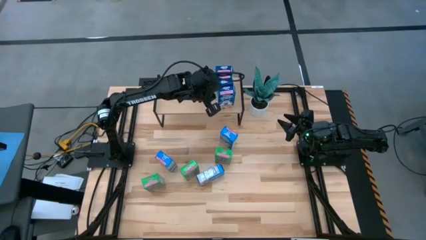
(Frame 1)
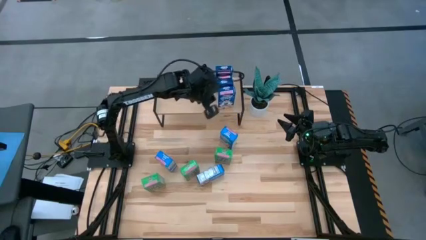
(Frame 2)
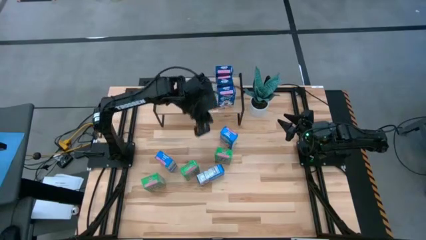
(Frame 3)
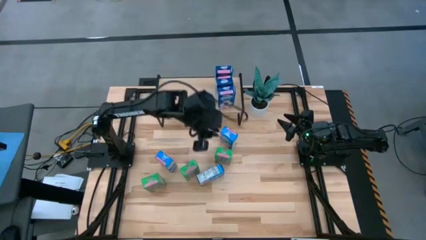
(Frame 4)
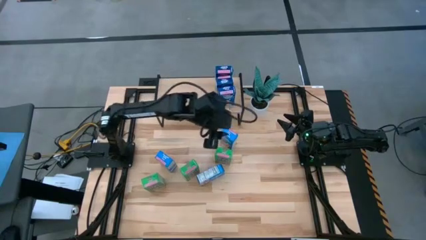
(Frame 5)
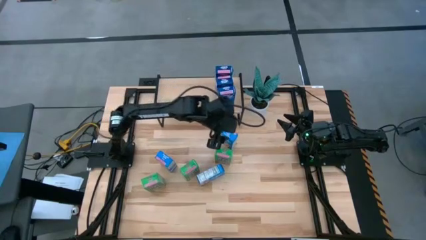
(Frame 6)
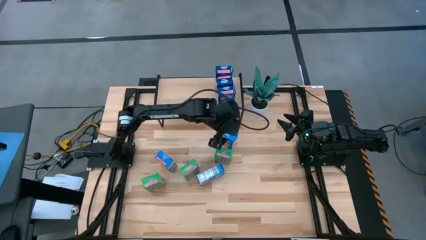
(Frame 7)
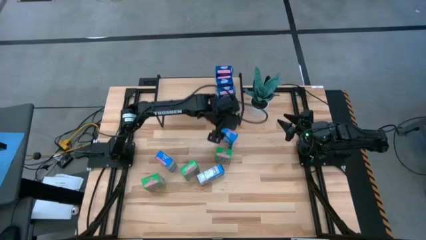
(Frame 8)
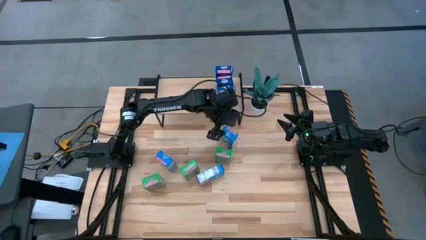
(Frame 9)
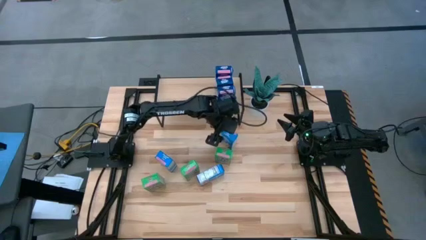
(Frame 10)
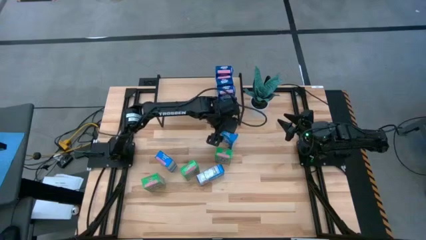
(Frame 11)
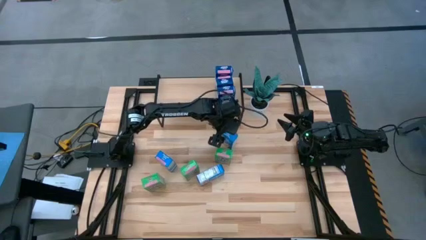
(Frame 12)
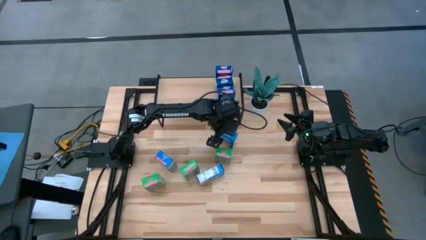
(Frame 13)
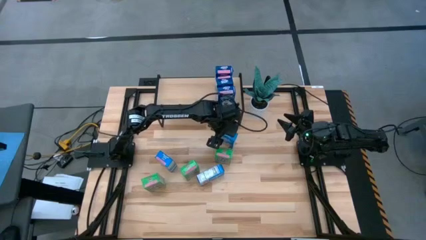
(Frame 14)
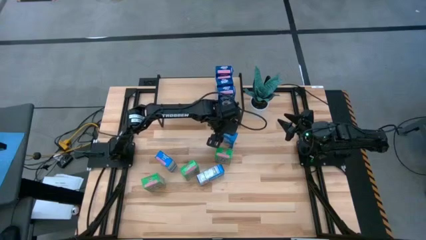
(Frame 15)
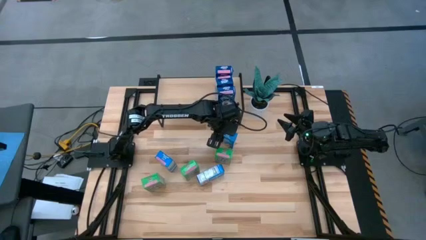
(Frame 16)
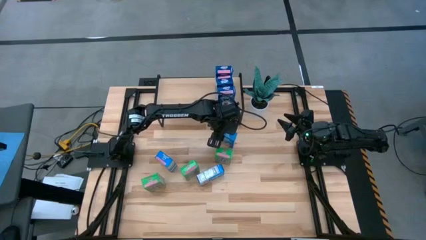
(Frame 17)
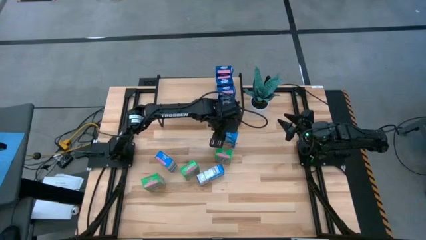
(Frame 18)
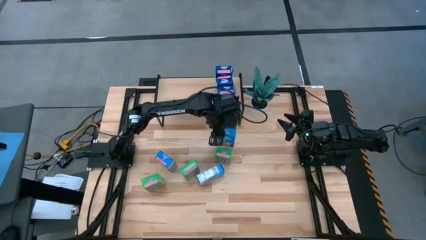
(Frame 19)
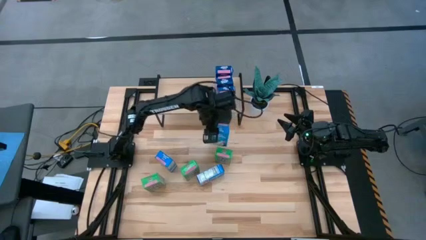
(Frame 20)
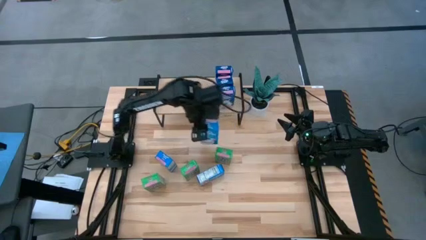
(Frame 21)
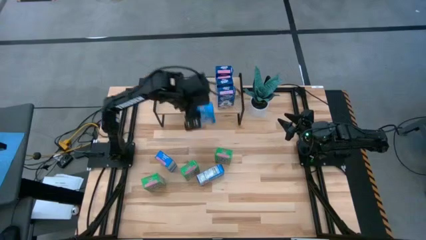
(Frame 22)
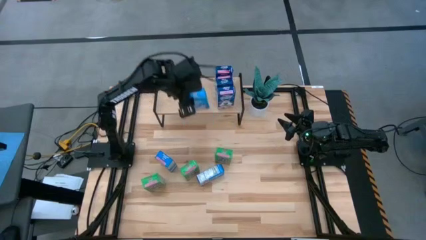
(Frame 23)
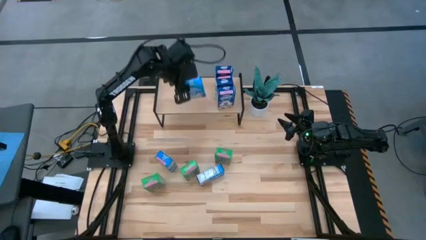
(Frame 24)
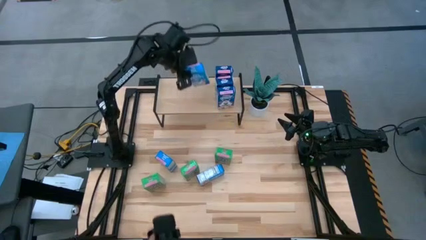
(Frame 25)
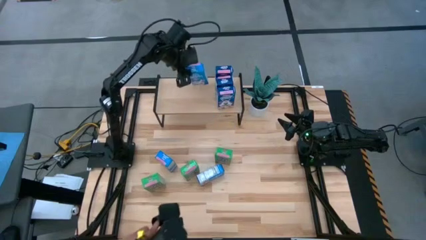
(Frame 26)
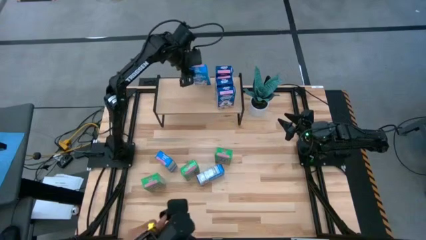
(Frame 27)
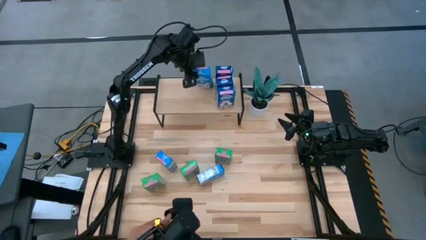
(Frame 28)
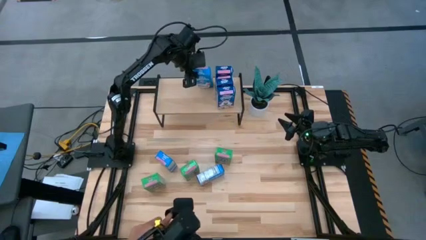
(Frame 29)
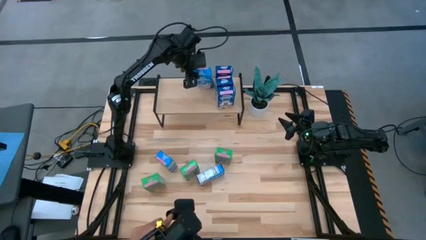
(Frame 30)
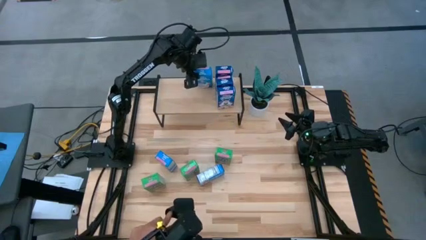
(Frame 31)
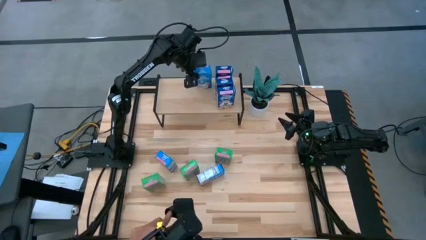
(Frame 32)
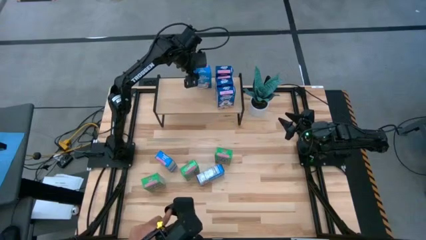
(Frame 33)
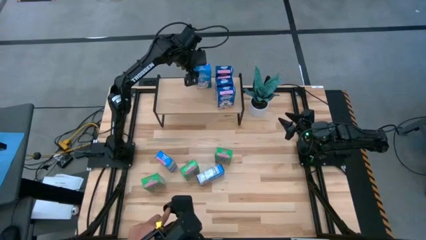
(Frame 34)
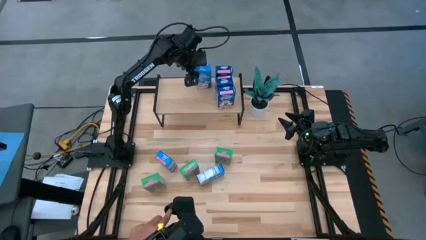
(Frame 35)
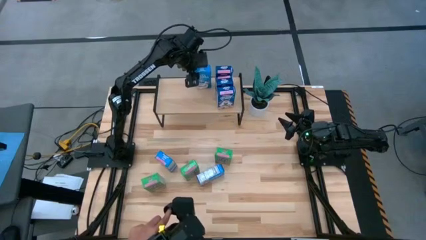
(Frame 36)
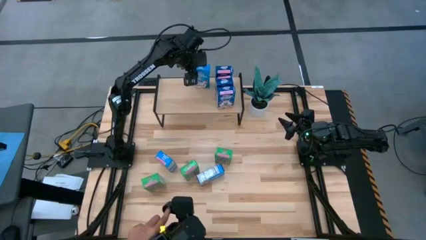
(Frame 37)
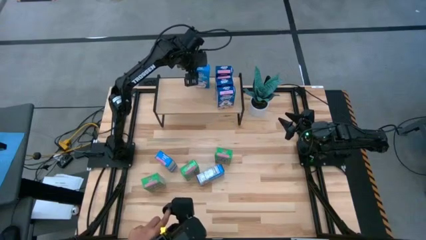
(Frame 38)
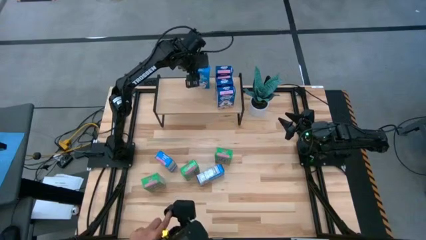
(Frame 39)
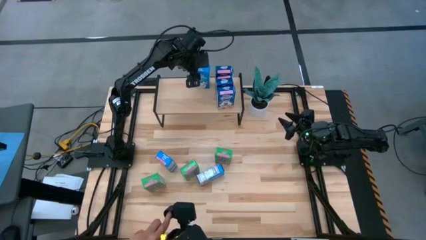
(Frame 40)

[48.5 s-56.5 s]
Task: Stack cereal on shelf
Put the top light blue cereal box on the shelf

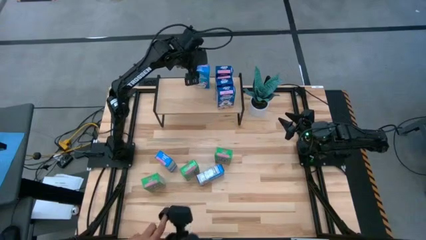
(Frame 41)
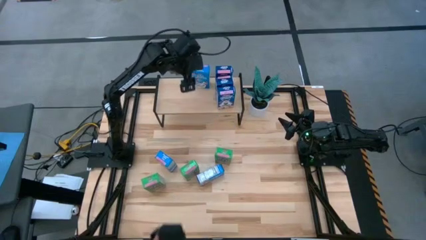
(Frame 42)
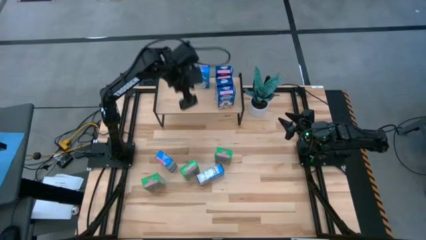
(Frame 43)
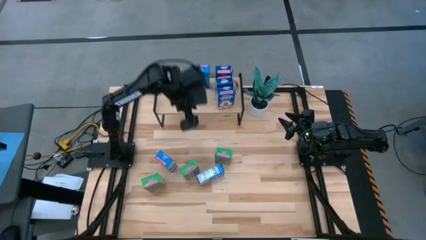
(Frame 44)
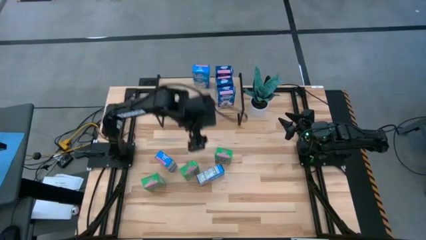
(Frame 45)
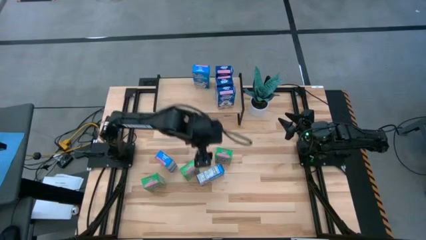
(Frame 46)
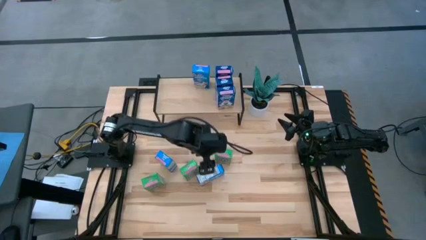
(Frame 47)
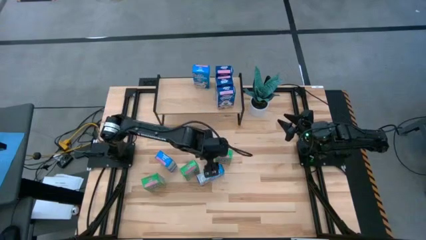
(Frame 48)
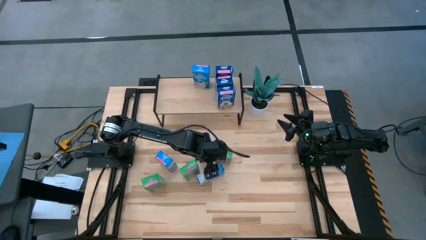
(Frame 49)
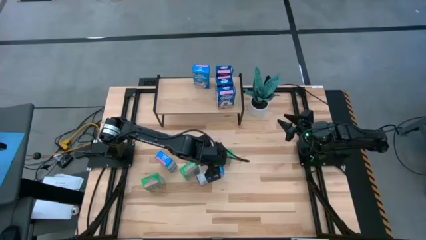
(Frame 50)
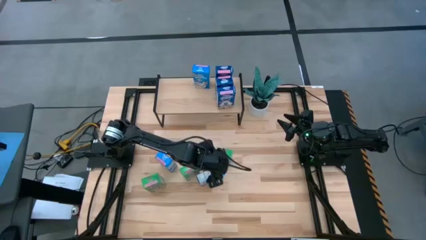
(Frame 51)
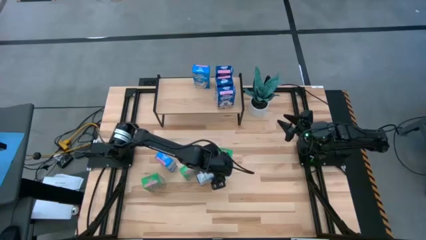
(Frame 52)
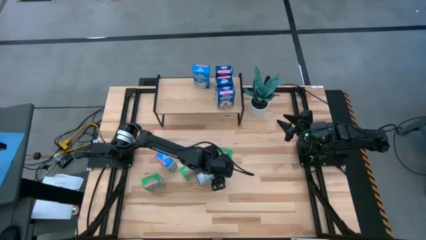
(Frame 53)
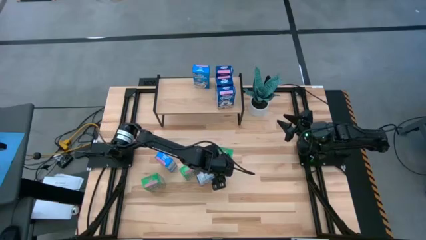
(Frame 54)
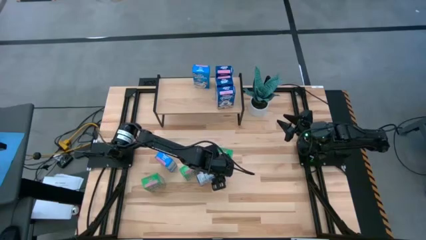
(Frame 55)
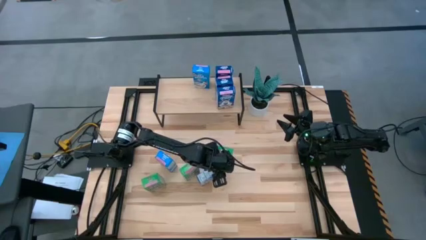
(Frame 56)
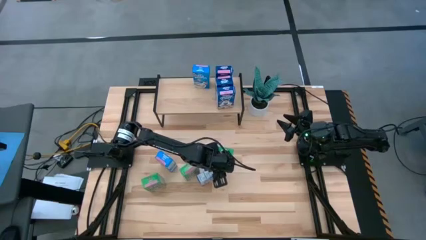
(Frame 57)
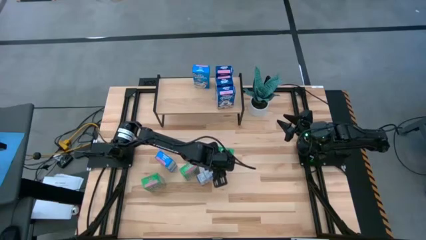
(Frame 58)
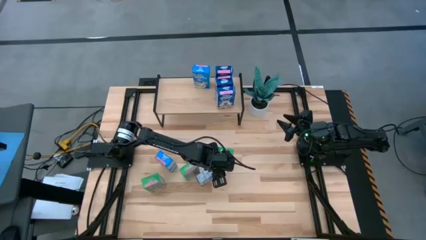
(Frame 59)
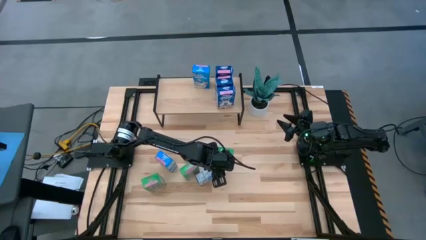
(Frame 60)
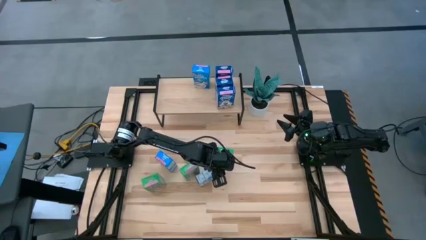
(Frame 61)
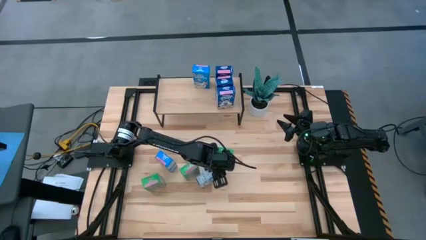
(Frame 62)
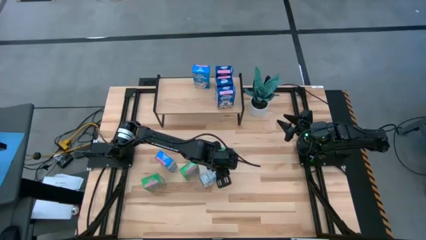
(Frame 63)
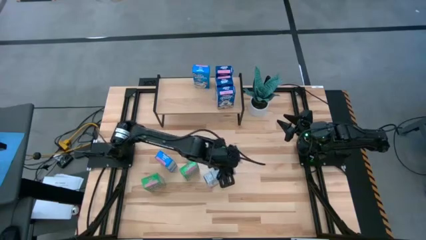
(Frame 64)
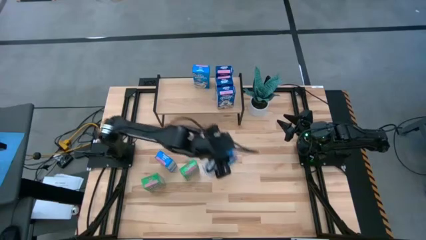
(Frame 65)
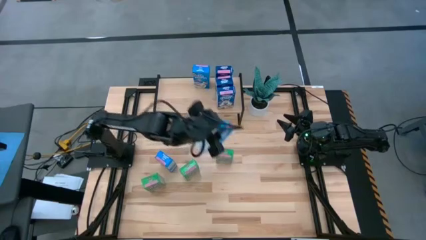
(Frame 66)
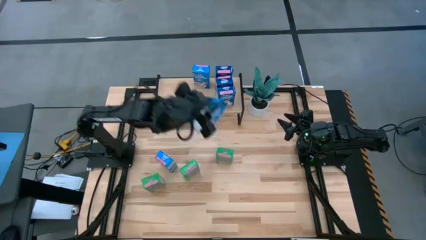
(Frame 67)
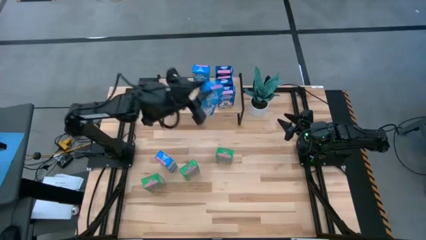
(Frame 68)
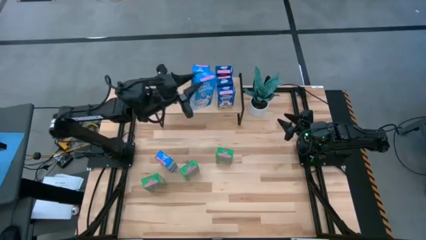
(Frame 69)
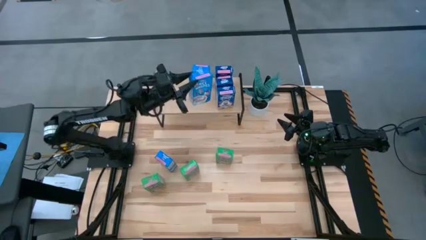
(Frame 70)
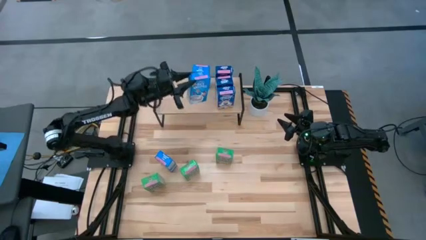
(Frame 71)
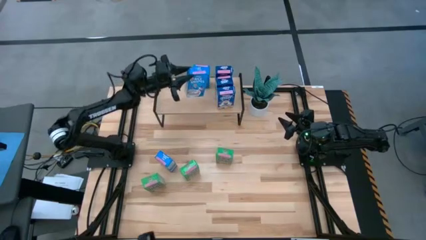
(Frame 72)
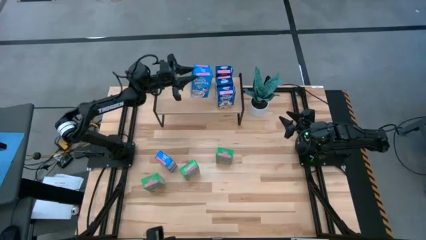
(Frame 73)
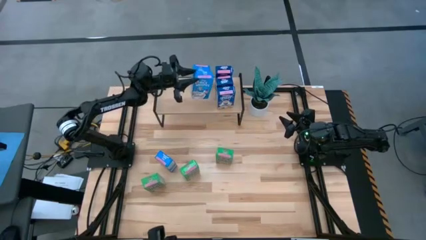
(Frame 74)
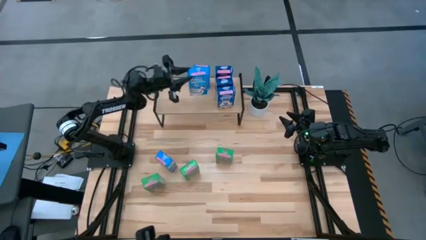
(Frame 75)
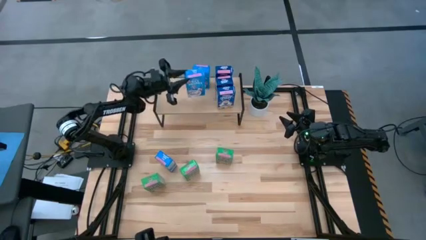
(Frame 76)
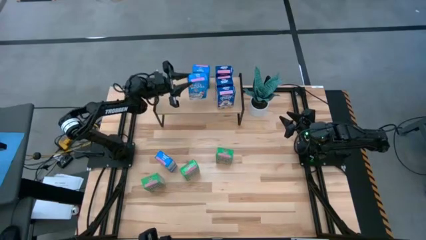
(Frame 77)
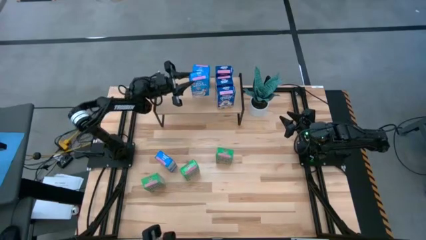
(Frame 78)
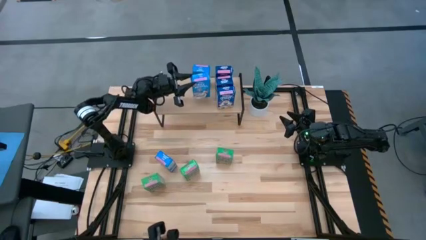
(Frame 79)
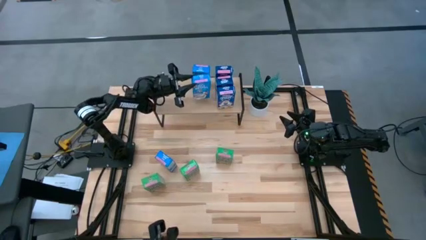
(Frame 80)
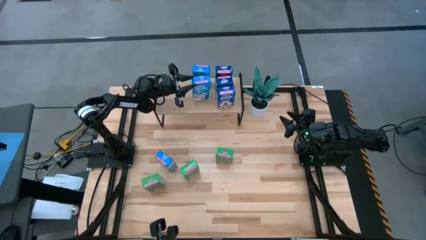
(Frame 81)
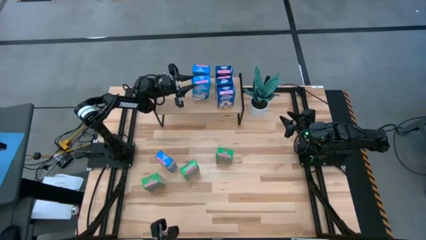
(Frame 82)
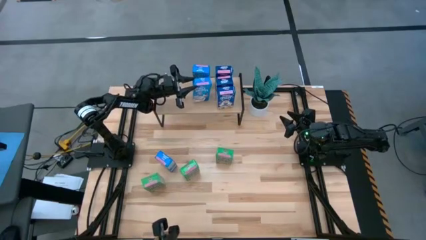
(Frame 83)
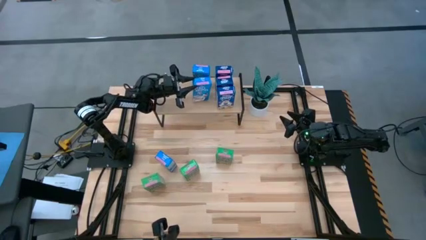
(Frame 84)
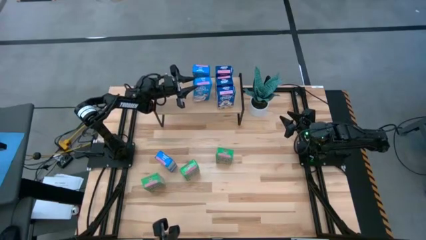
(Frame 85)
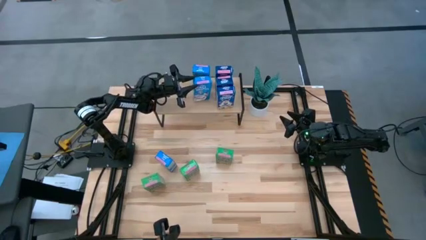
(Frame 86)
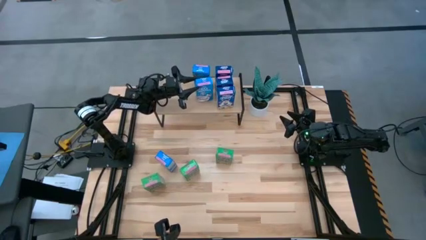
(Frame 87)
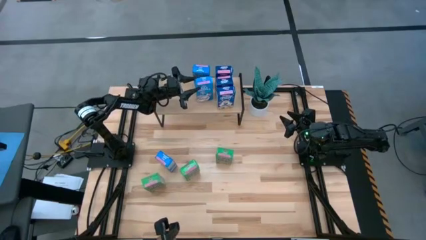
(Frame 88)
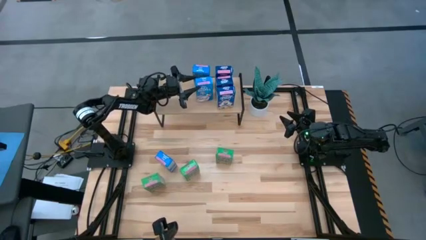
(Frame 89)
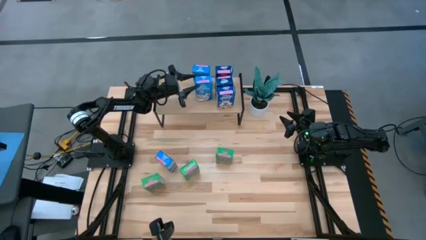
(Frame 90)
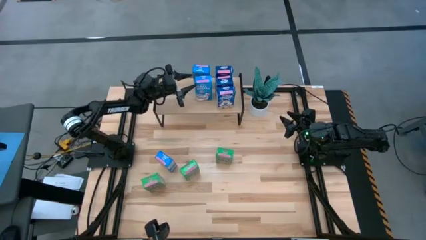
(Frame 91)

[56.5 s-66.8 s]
Put the bottom light blue cereal box on the shelf aligned with the other light blue cereal box
